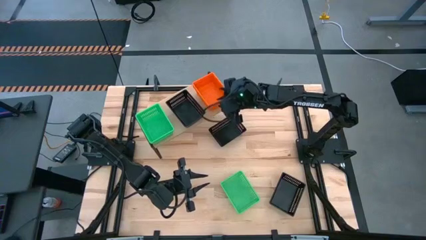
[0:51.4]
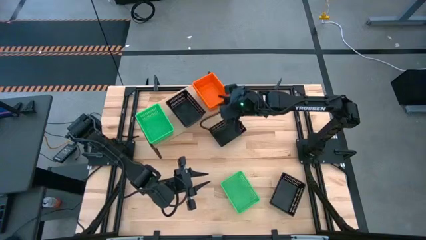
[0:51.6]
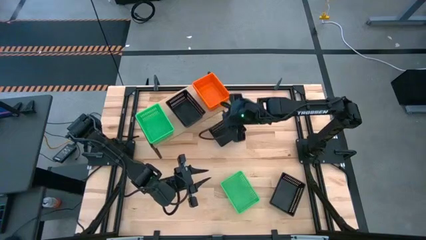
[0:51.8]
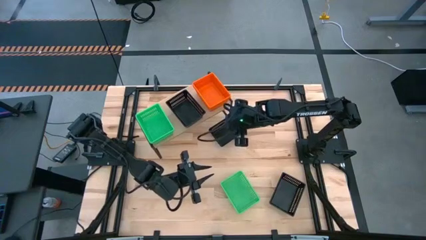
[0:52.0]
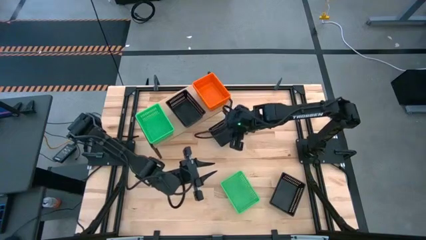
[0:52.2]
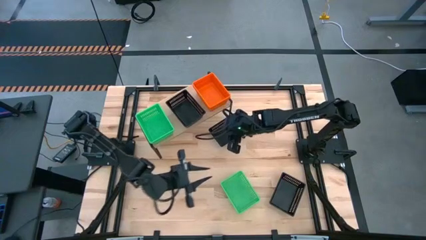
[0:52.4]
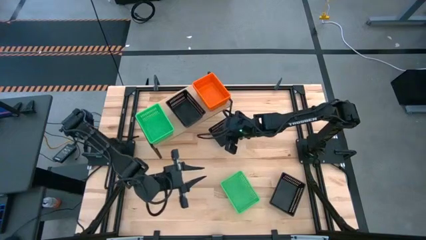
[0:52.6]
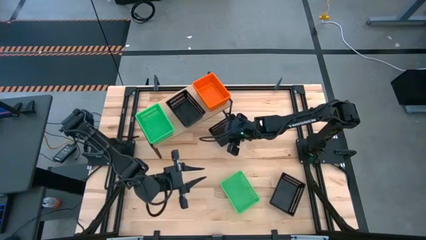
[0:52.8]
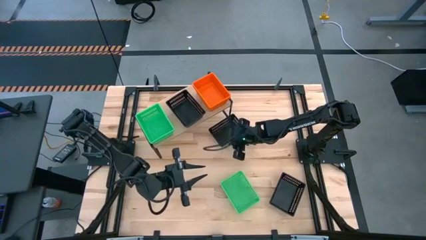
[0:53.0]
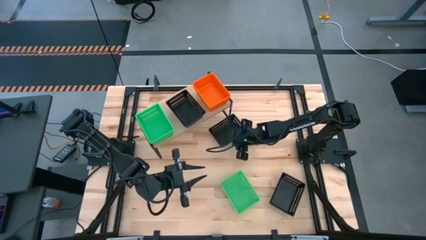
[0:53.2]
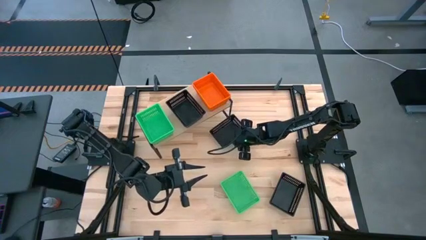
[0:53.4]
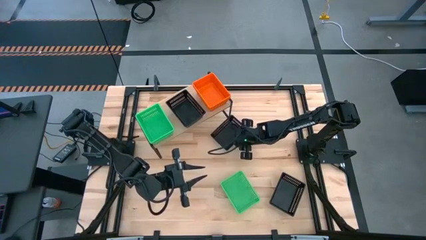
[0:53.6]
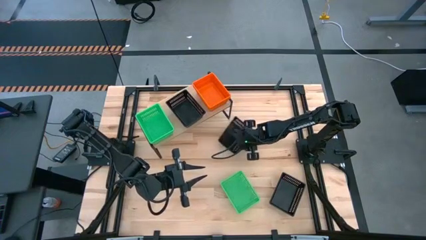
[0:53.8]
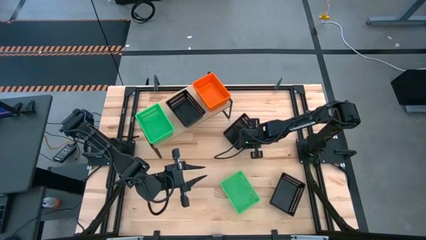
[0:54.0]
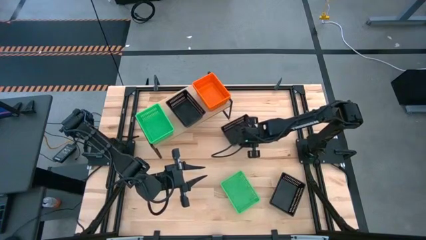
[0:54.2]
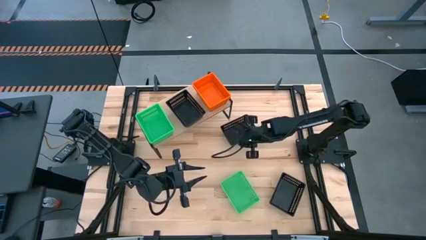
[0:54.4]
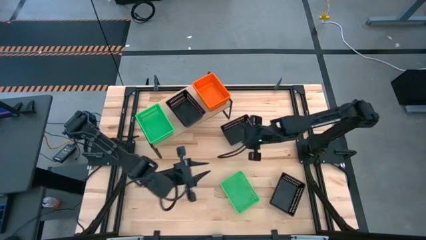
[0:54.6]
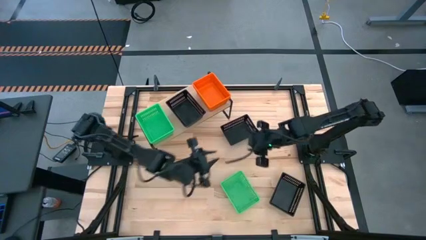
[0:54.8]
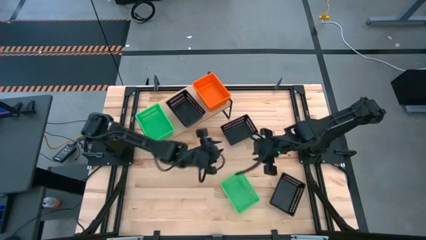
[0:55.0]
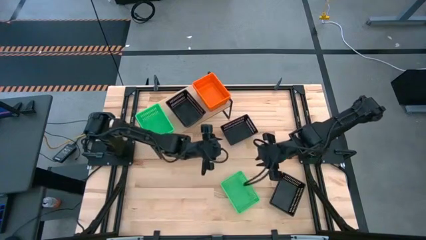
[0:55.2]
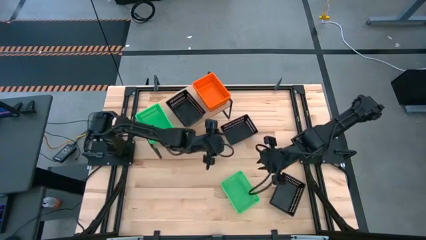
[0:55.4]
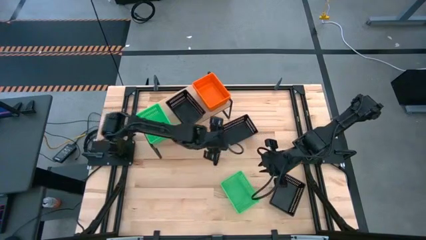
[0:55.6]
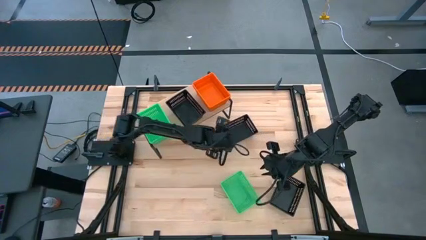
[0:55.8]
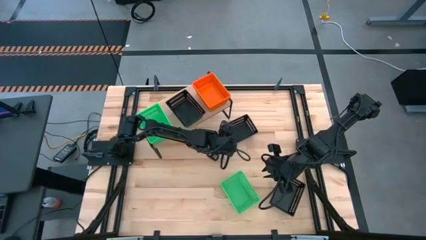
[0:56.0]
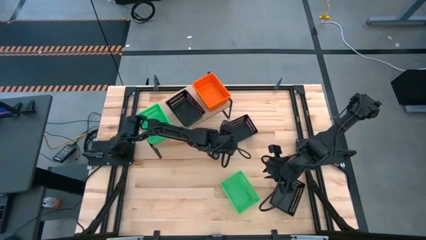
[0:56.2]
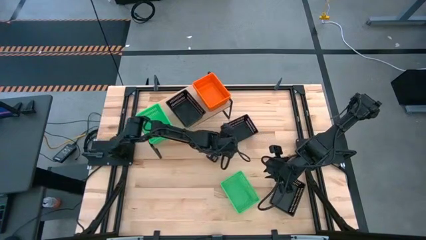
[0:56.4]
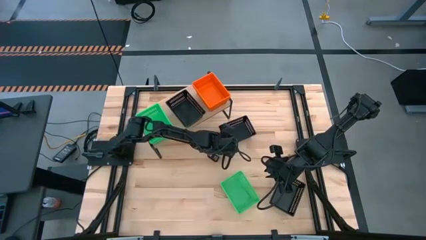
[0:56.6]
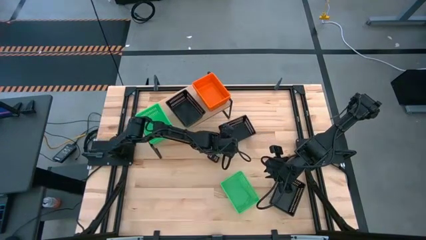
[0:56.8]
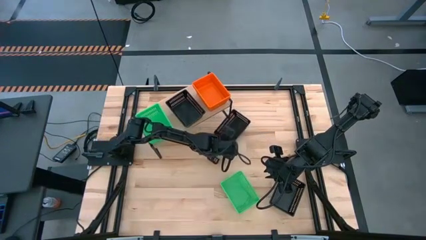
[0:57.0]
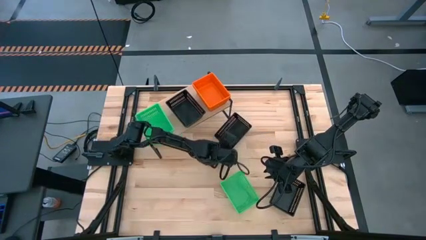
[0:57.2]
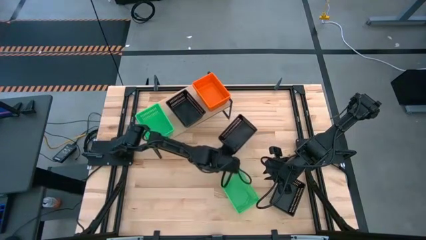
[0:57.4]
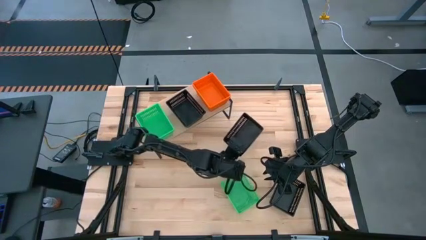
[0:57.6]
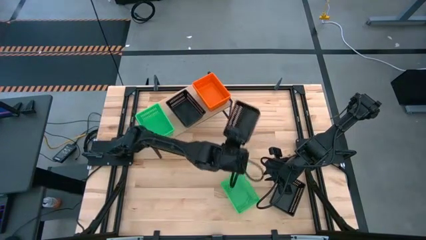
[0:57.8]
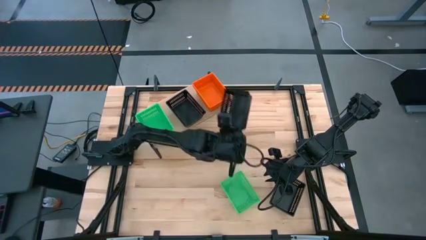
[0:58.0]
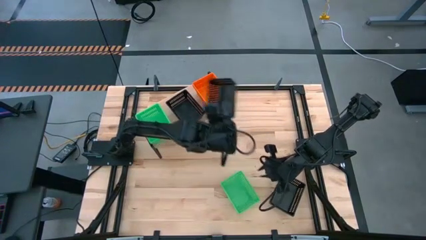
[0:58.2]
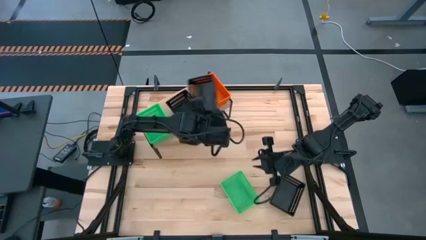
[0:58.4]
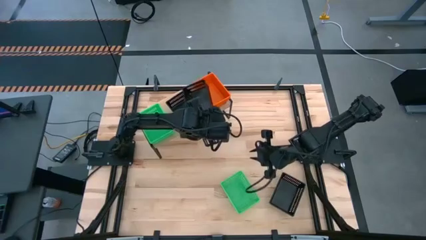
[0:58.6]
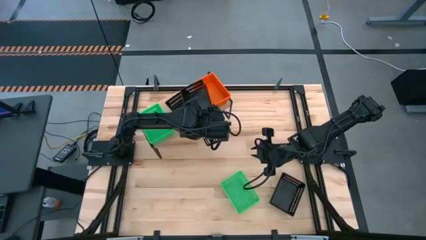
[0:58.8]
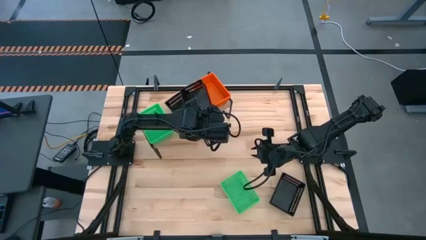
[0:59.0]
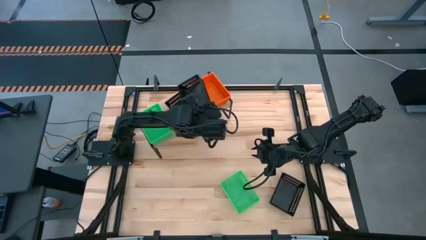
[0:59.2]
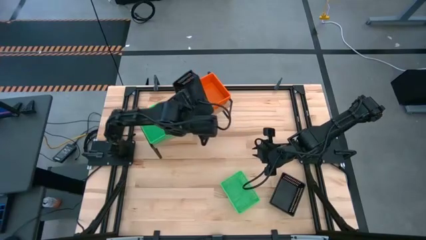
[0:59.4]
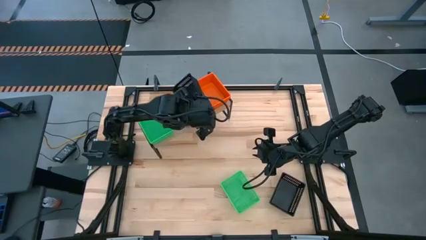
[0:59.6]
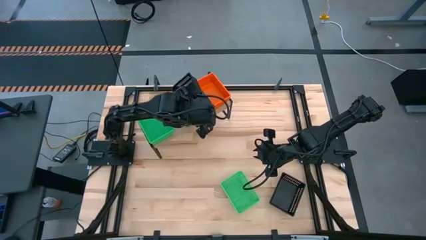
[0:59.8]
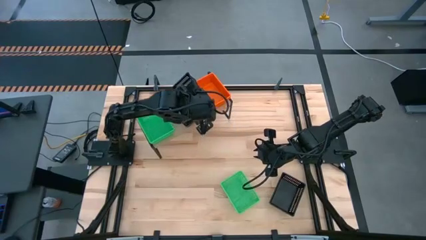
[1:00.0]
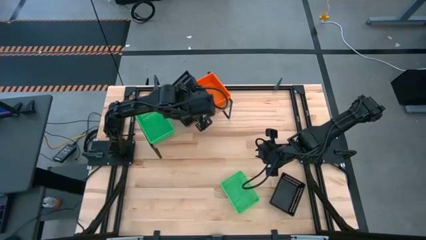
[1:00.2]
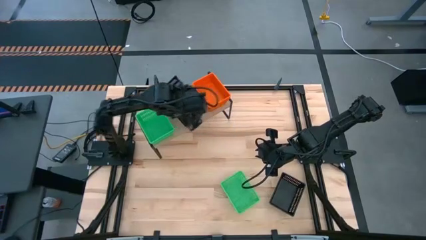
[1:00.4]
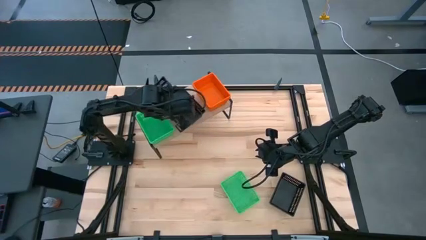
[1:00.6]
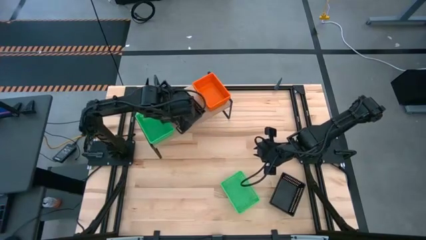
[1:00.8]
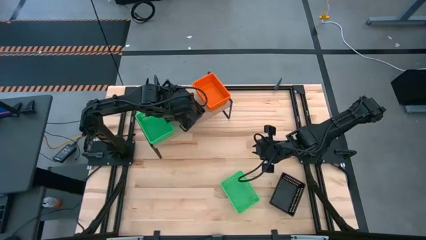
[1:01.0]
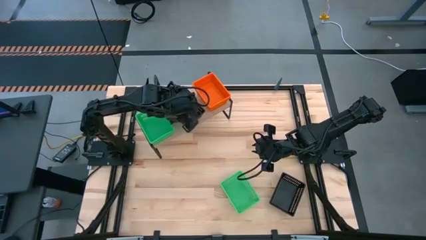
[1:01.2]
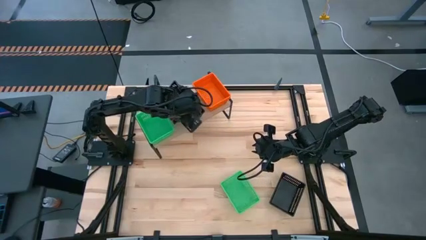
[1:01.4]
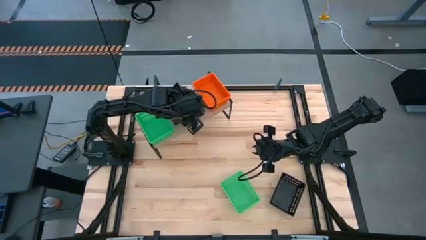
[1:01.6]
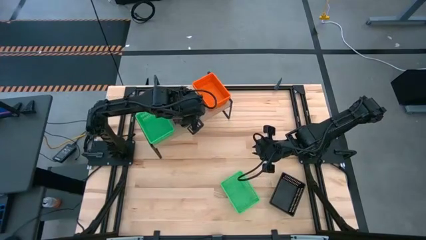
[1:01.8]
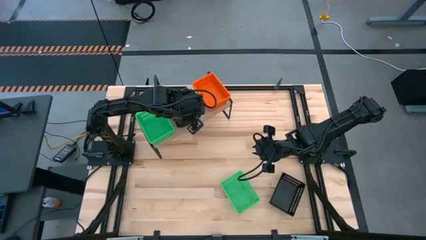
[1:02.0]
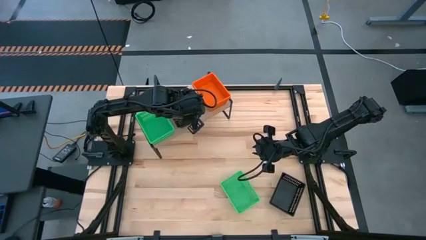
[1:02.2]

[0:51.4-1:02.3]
Task: Stack baskets on shelf by color
Stack the top black basket on the black basket on the shelf
